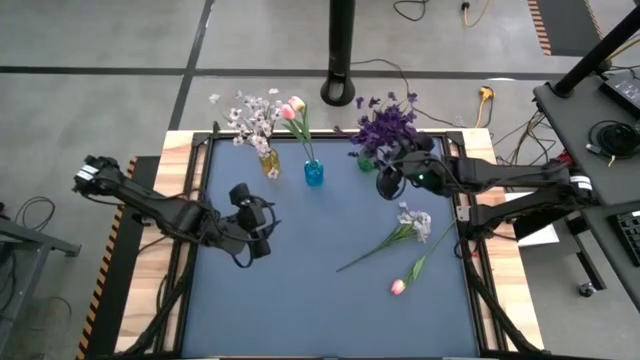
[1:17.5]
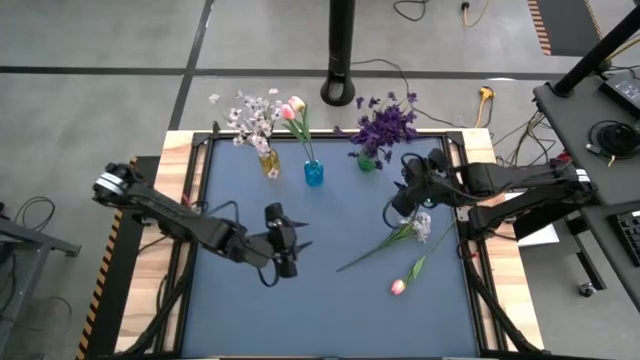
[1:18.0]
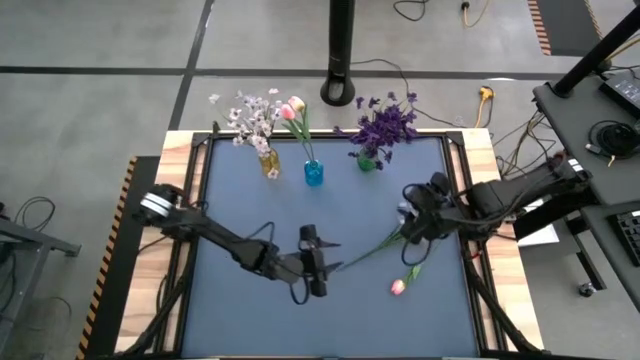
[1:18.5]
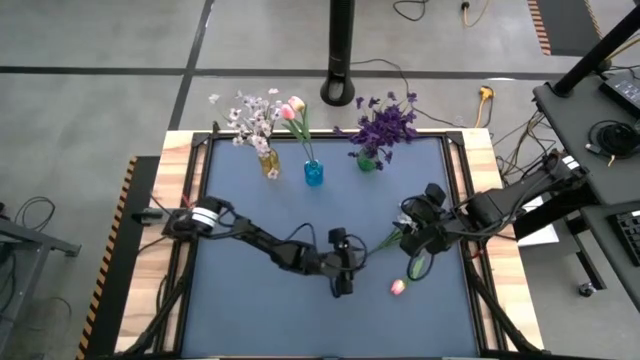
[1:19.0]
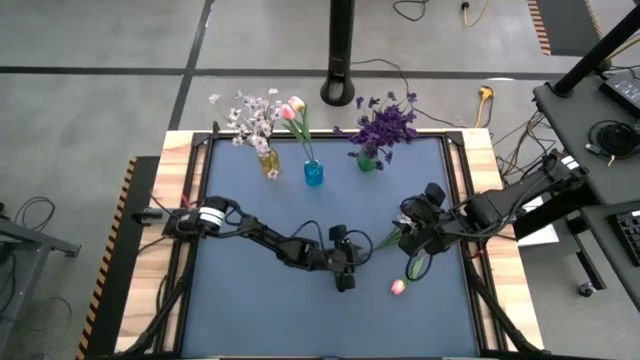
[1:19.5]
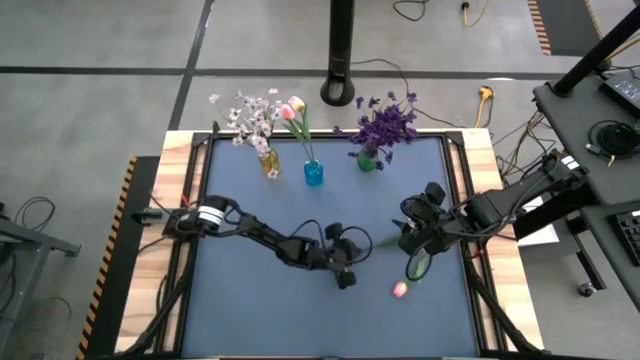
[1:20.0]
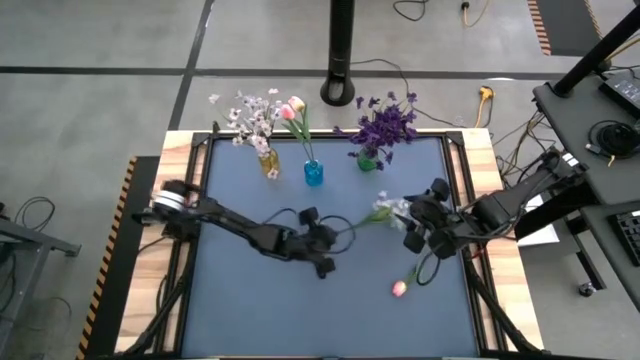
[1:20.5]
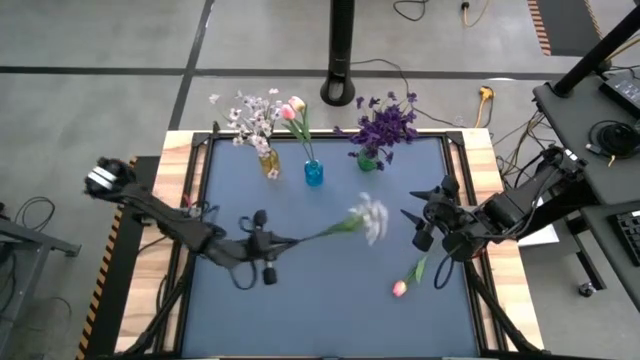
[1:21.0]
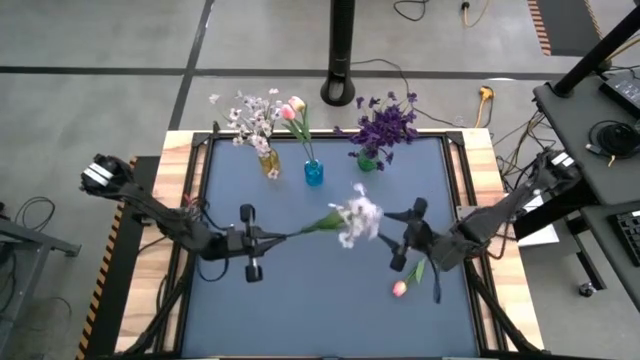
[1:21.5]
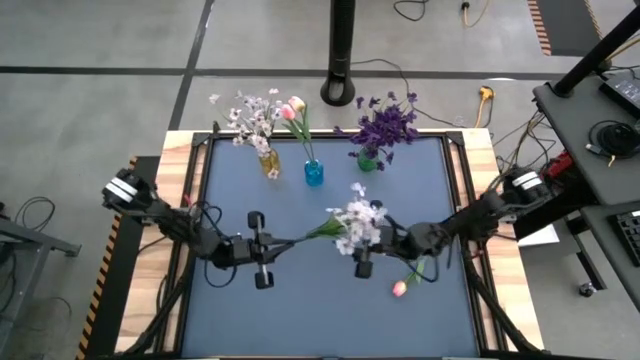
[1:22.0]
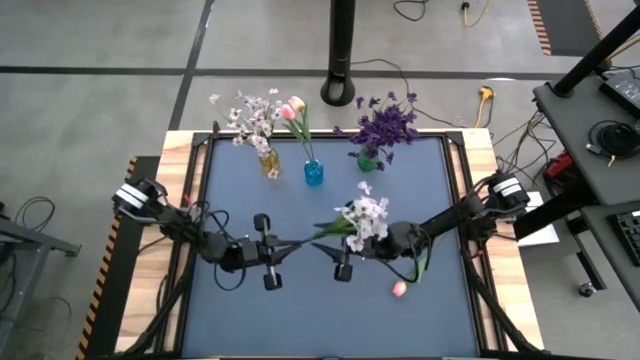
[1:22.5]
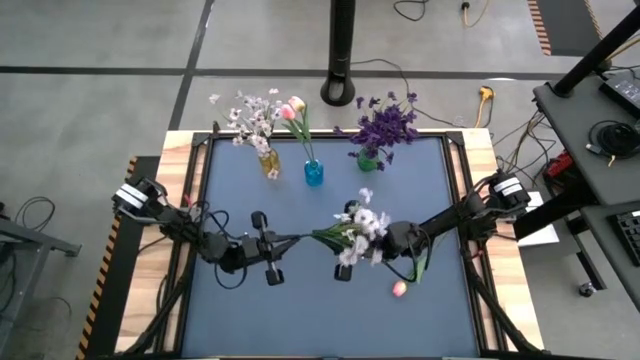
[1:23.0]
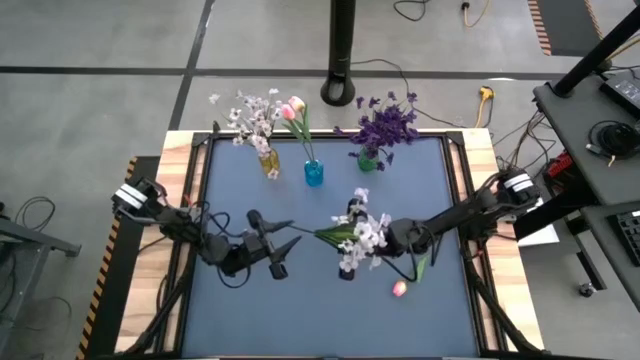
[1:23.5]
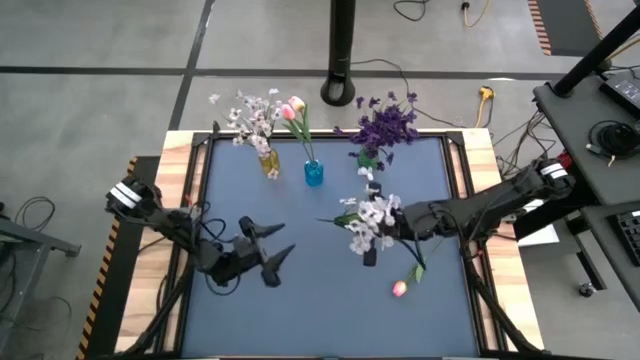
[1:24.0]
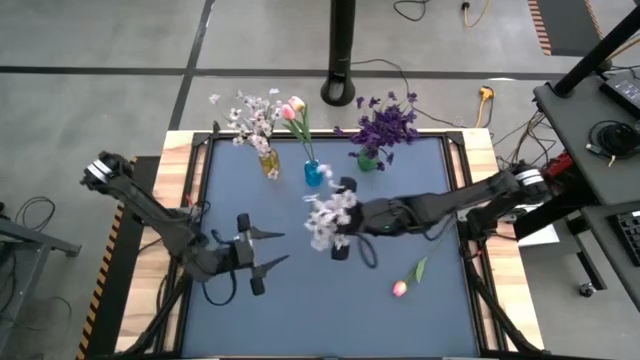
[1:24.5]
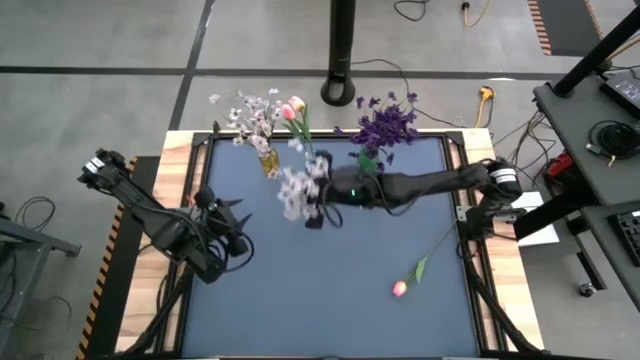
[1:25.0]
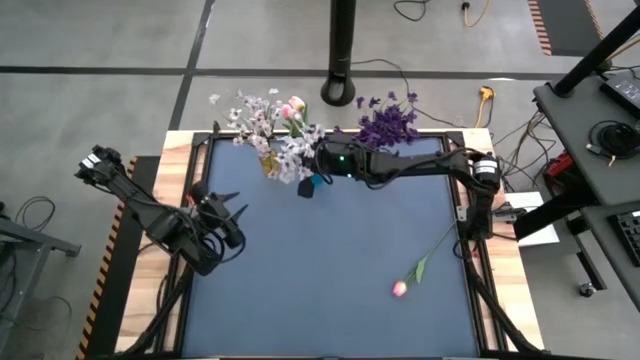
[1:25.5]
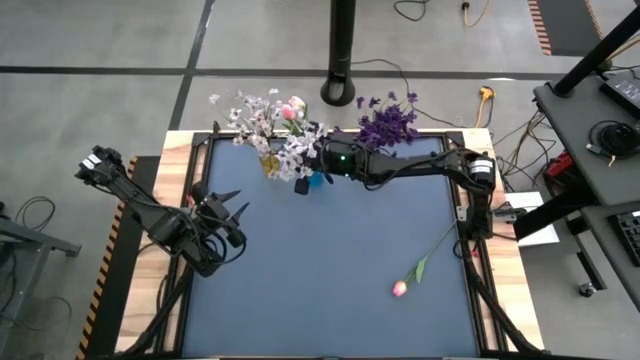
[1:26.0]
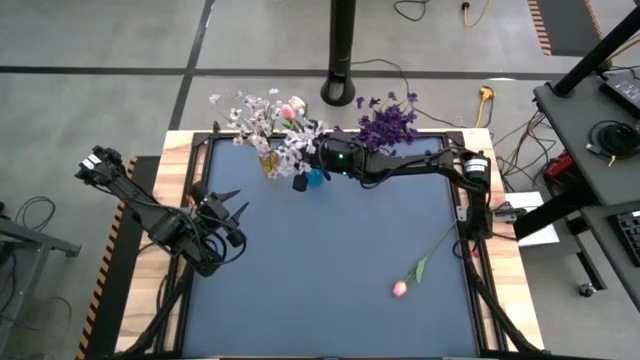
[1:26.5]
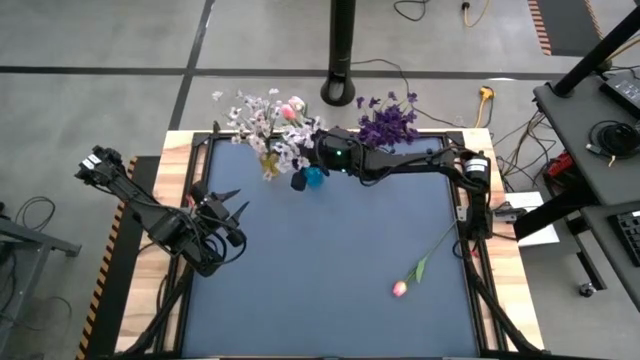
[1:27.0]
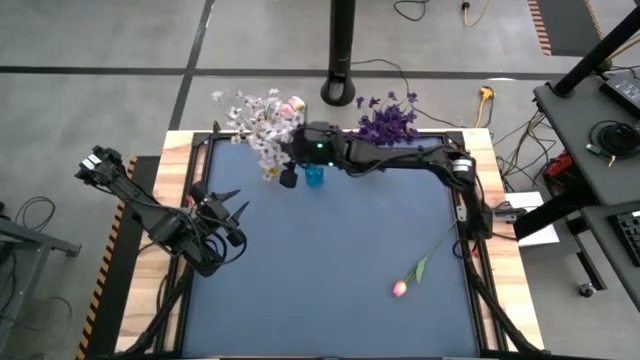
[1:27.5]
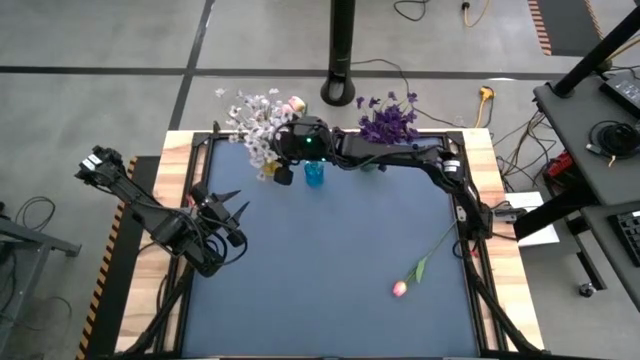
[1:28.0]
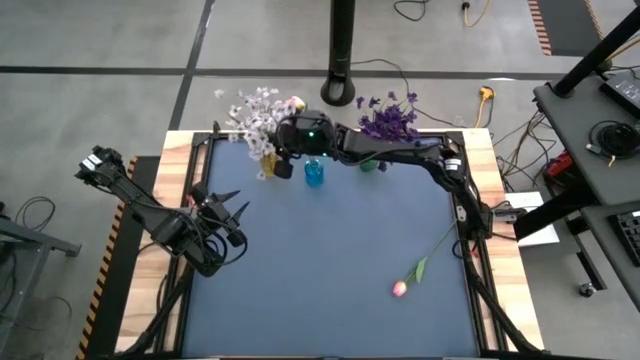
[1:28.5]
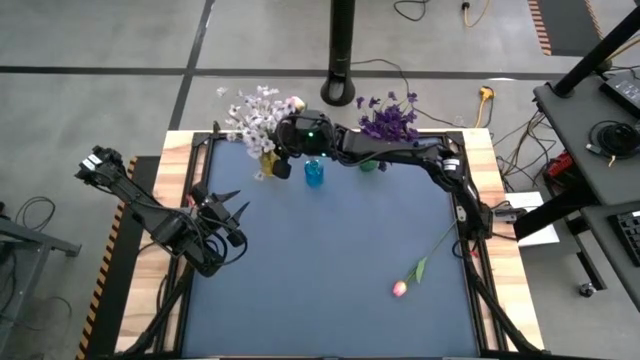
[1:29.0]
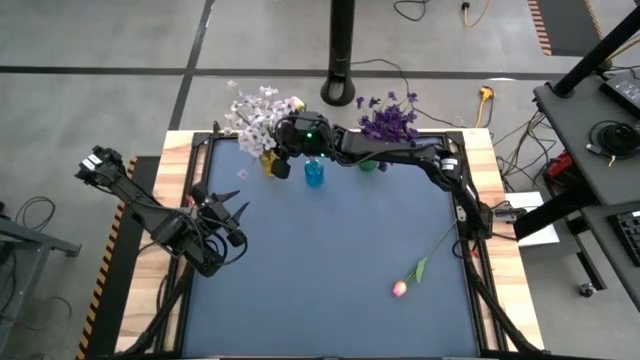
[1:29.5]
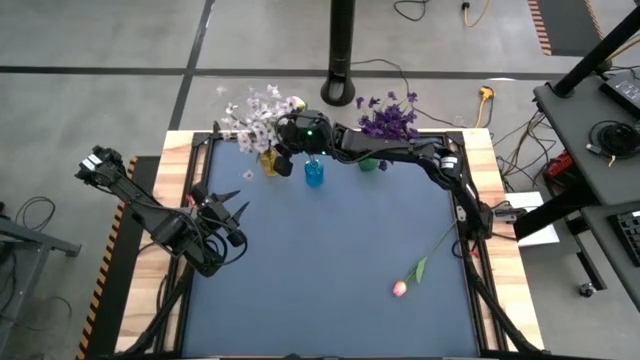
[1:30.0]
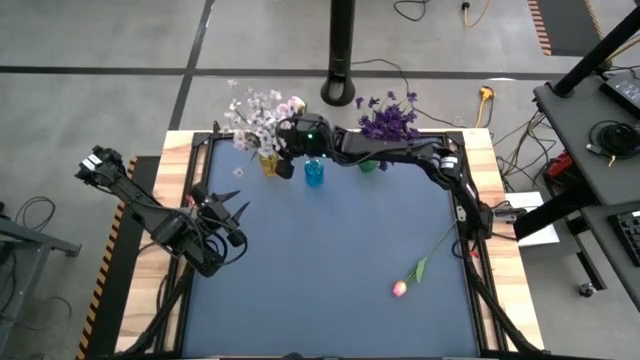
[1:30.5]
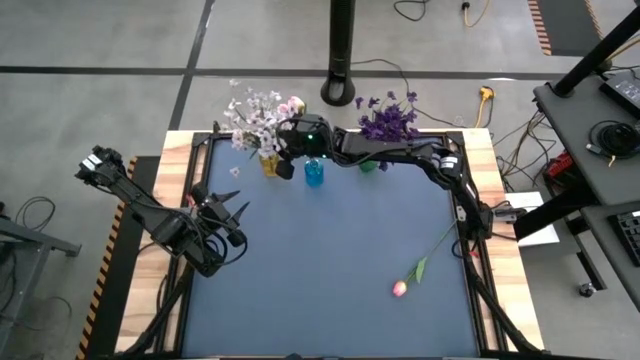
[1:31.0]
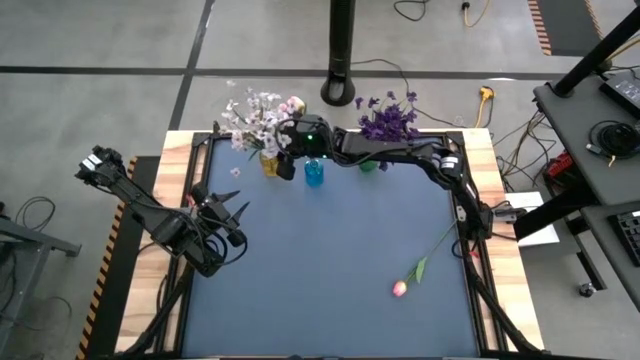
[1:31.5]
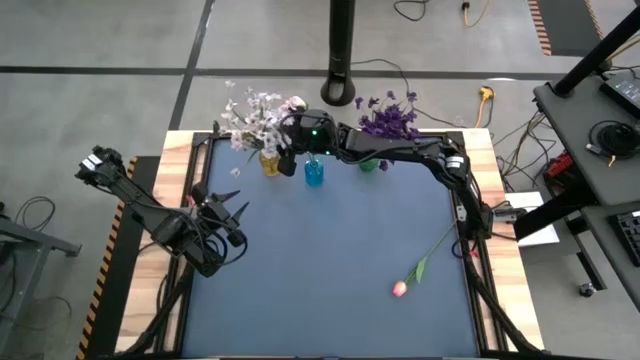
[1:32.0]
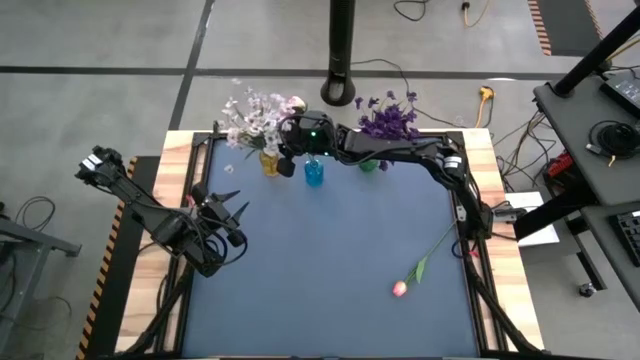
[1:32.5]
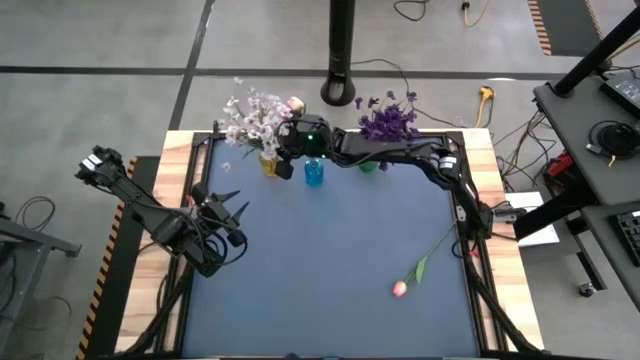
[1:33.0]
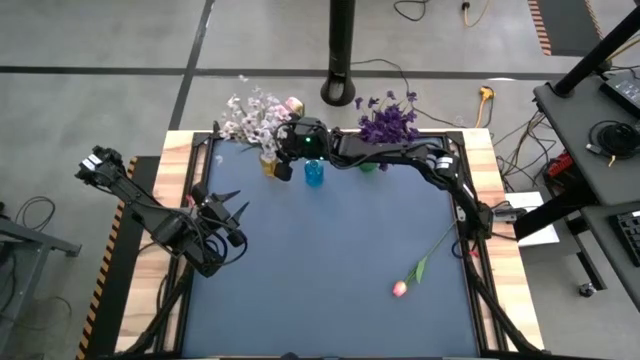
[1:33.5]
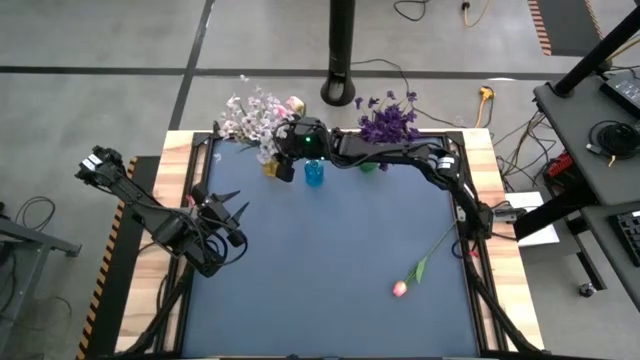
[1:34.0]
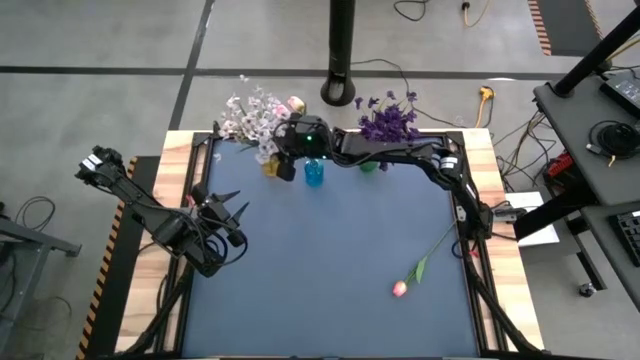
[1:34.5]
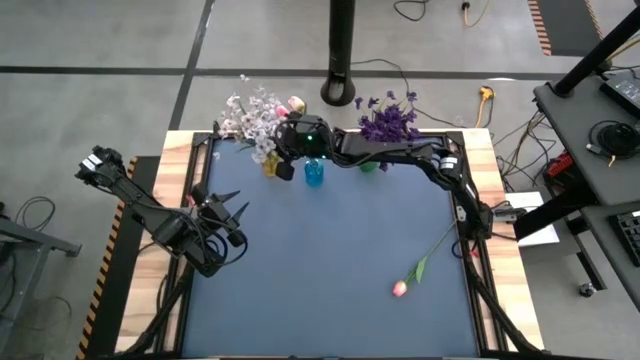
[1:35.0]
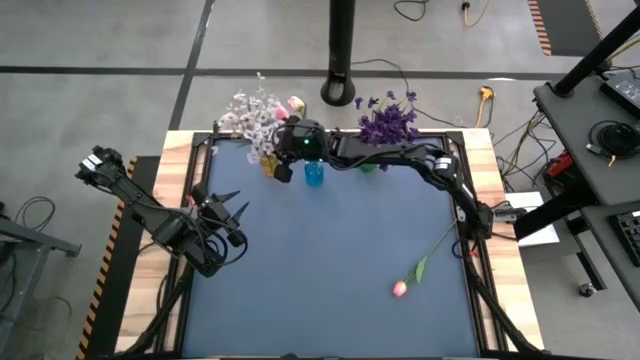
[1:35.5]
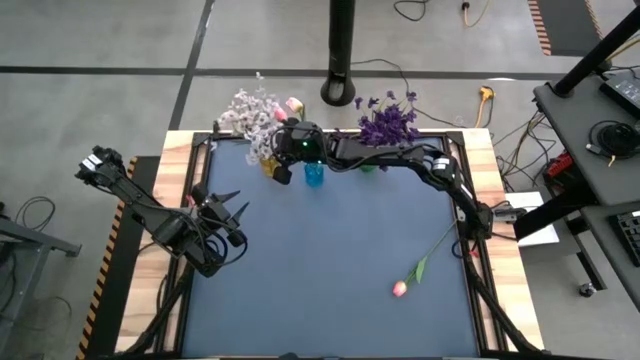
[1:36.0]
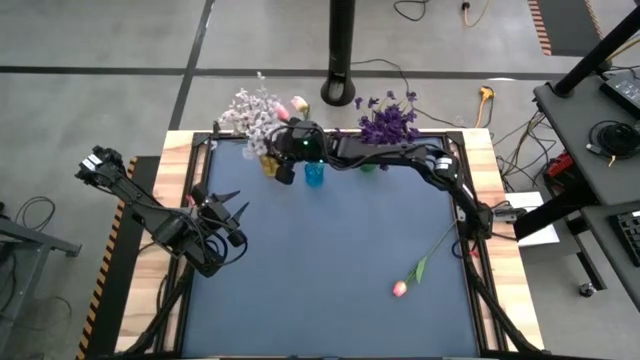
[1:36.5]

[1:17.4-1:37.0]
Task: Sort flowers into vase by color
Put the white flower into the yellow vase

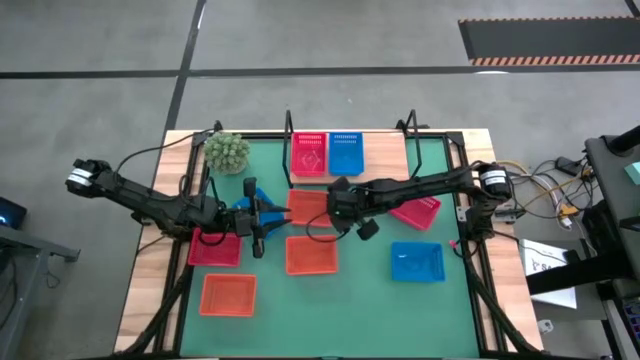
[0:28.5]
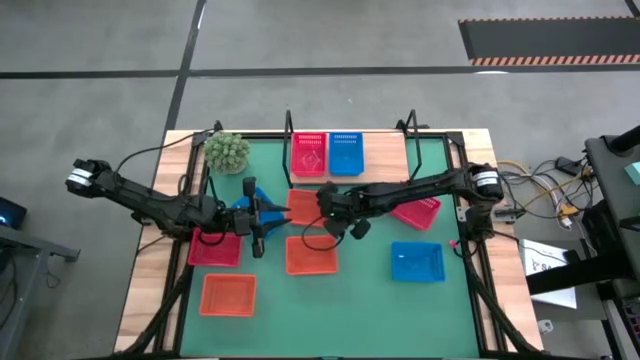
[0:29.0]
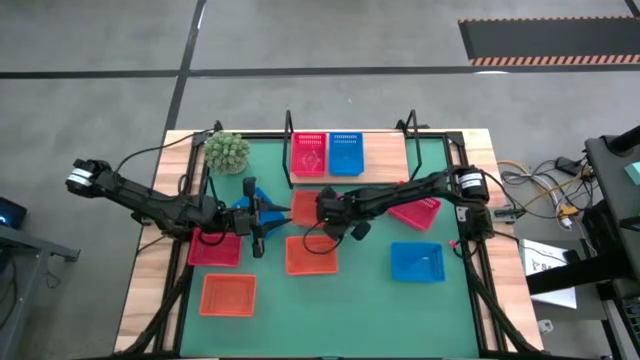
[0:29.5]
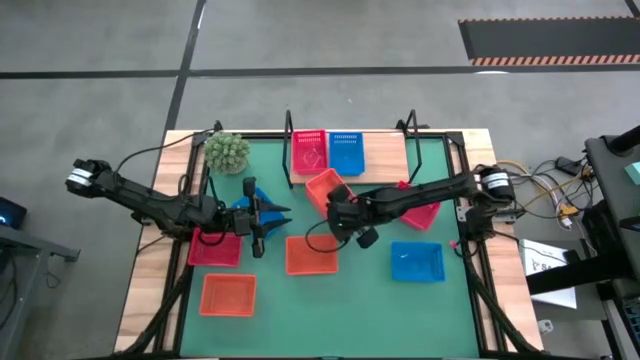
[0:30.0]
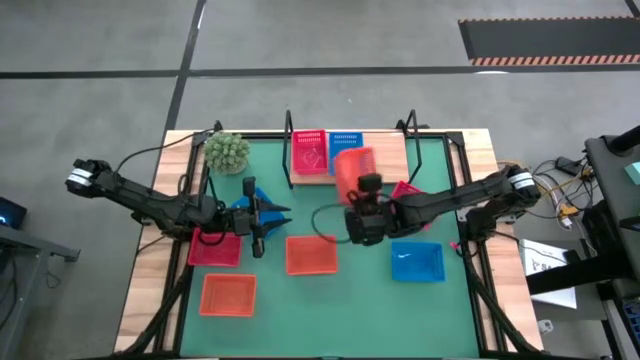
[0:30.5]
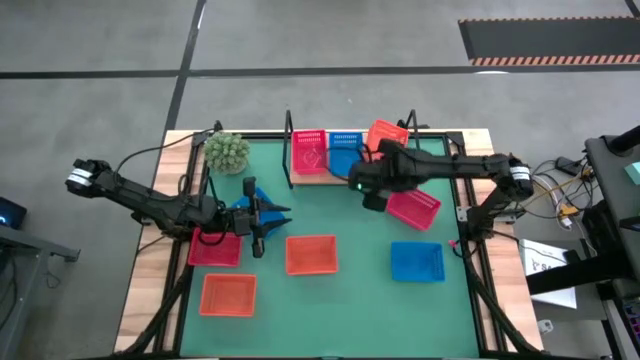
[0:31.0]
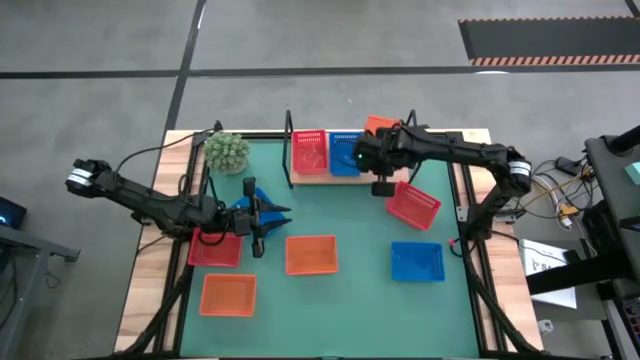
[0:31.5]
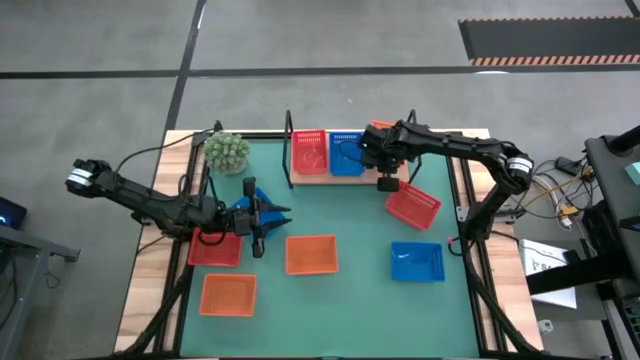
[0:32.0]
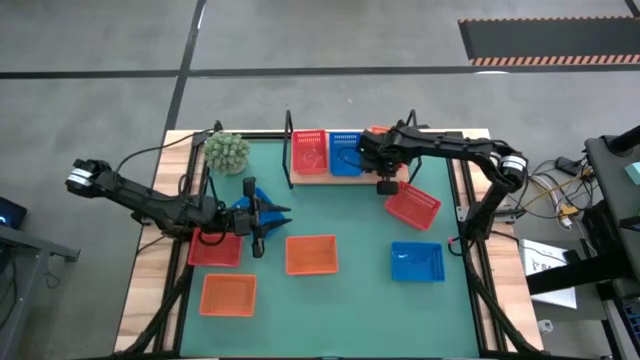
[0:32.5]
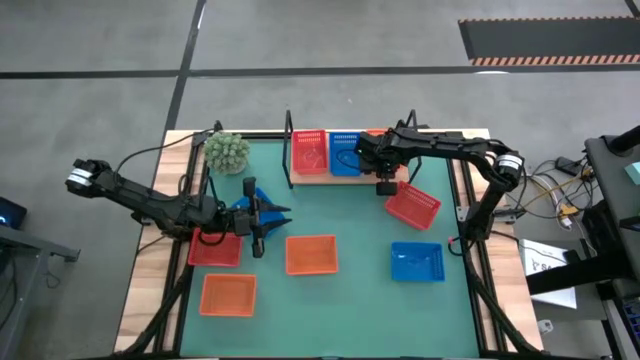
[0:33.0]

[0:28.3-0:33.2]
Task: Stack baskets on shelf by color
Put the top right orange bin on the shelf
